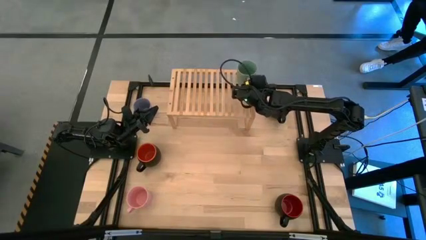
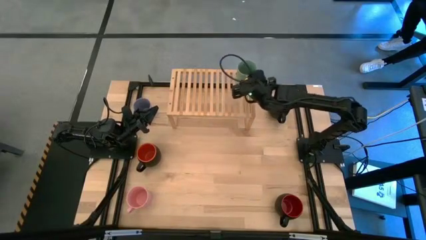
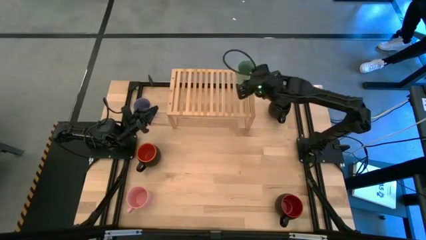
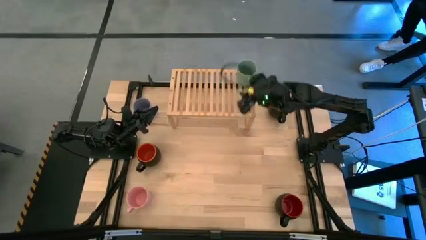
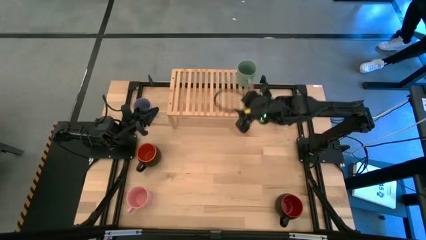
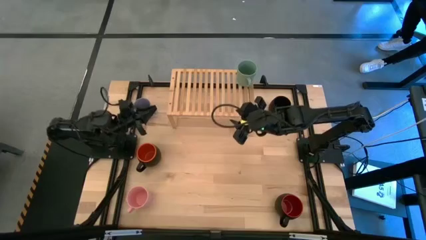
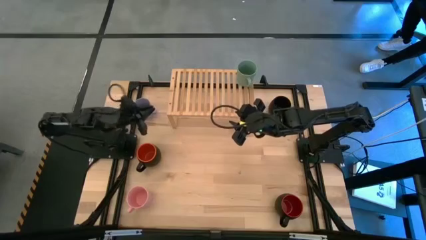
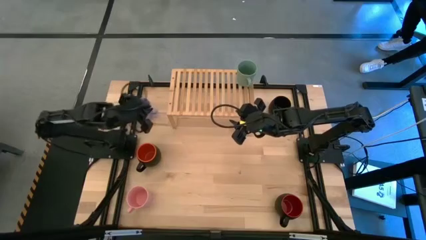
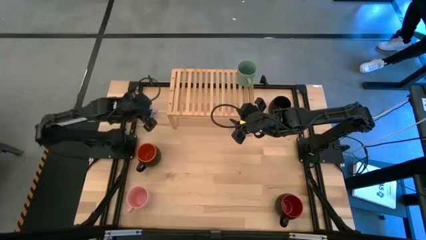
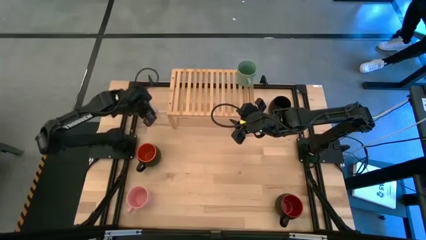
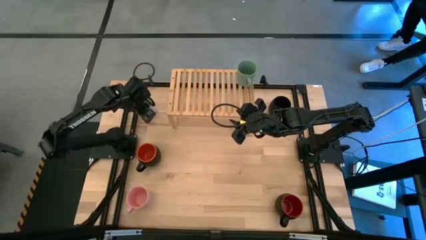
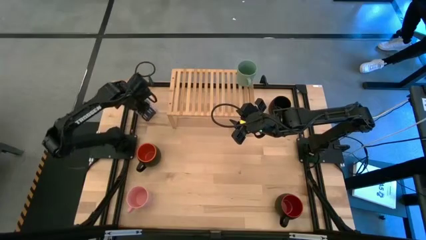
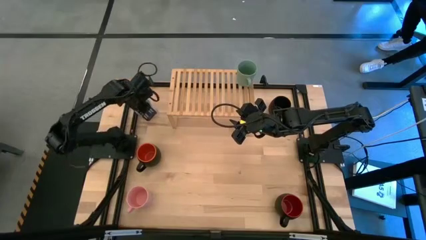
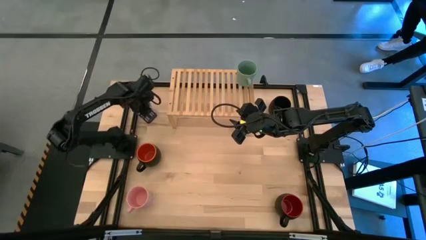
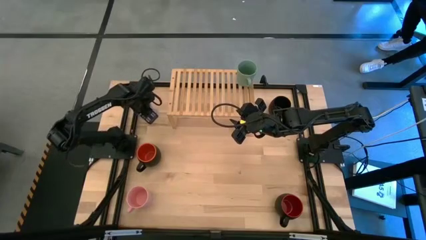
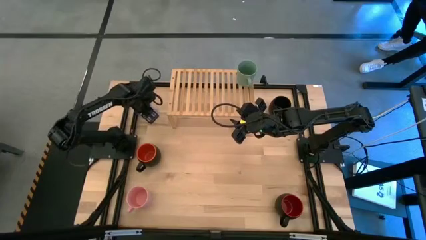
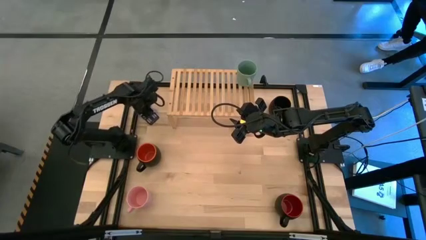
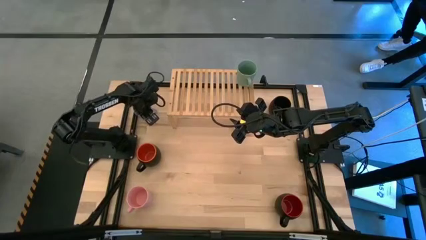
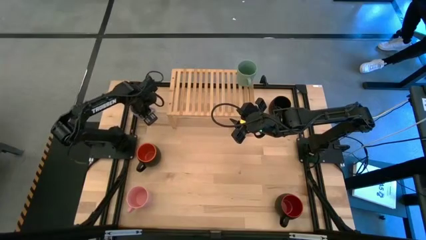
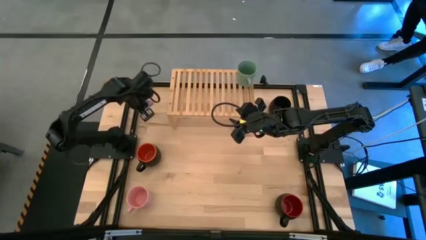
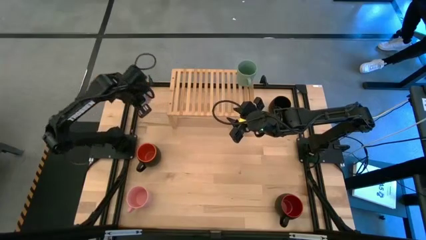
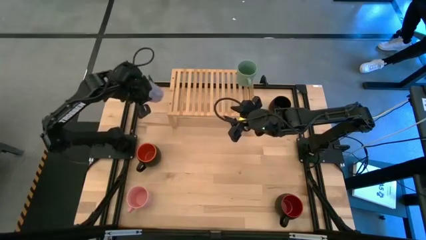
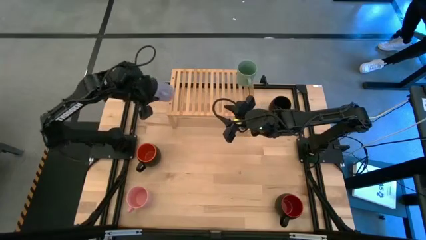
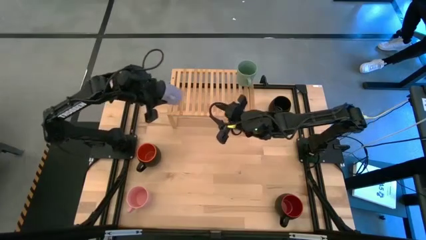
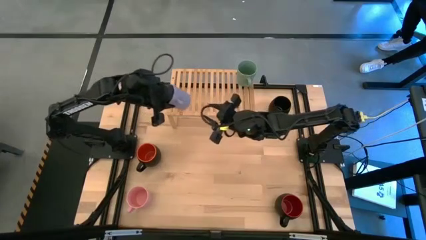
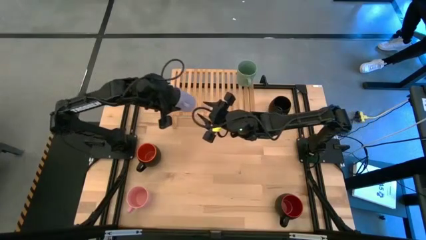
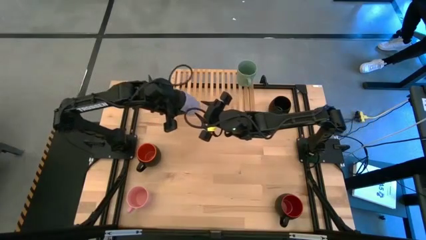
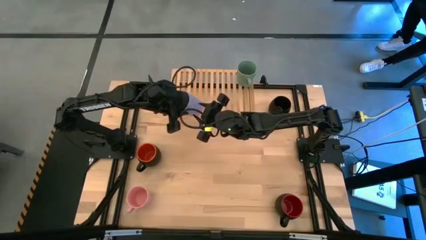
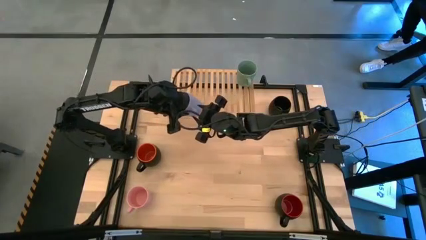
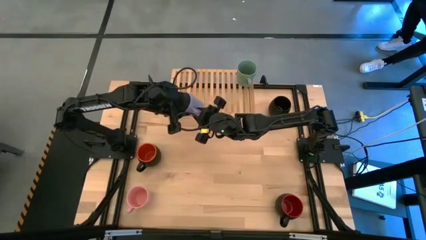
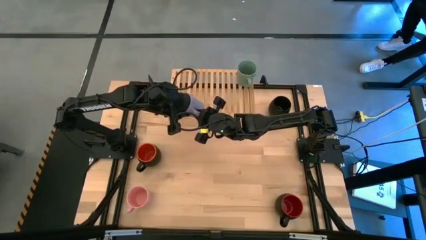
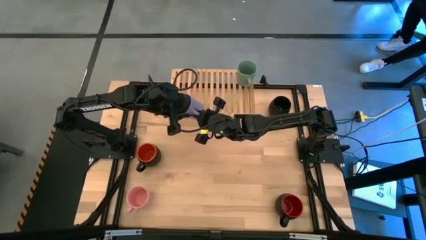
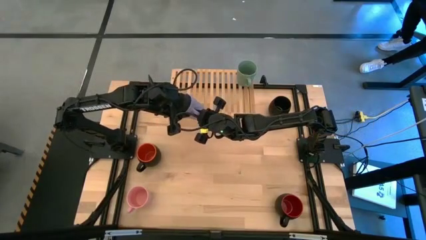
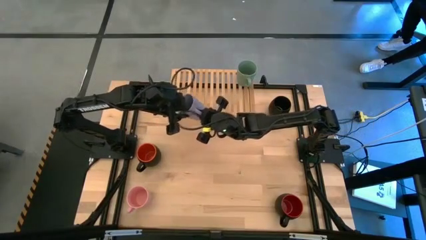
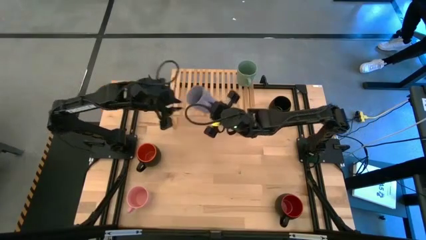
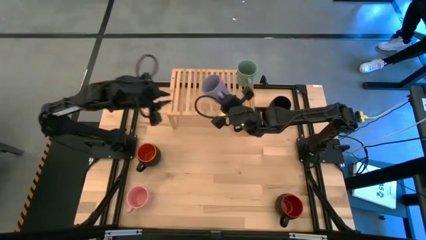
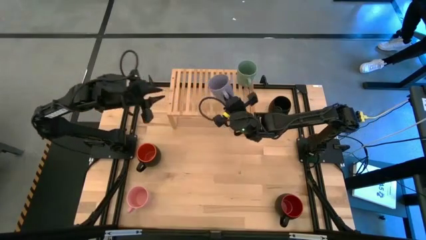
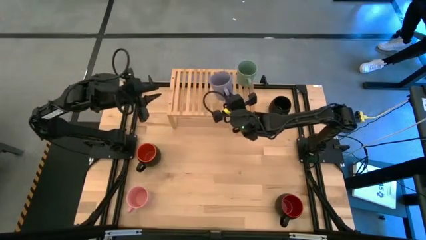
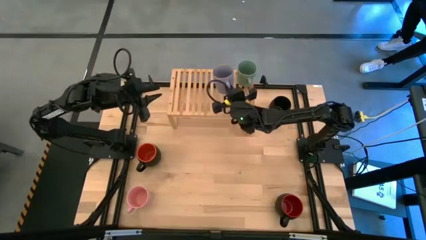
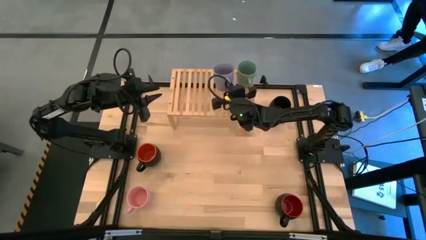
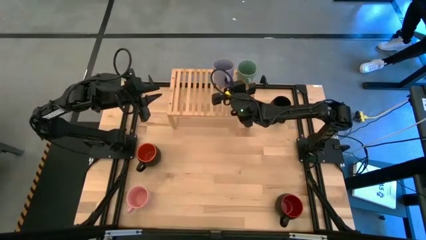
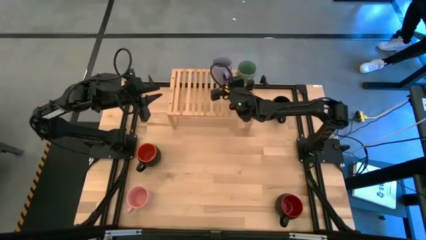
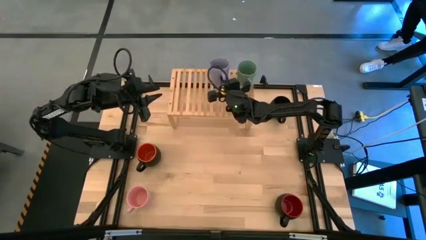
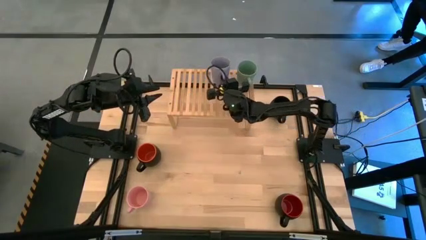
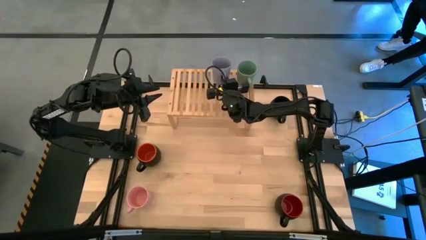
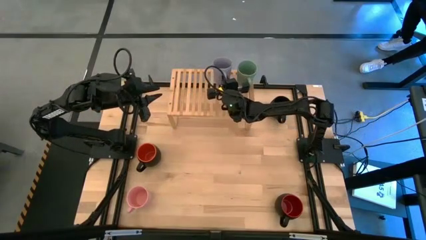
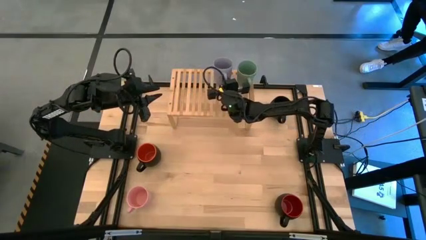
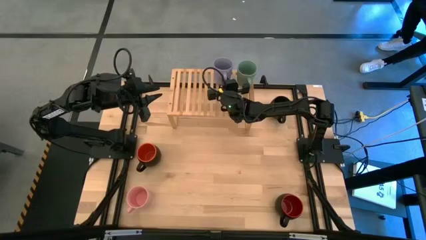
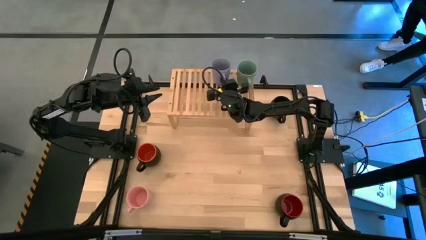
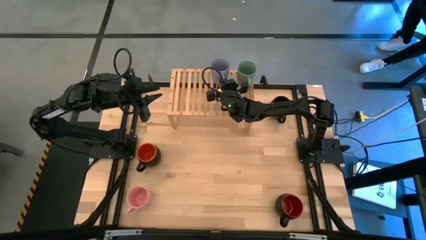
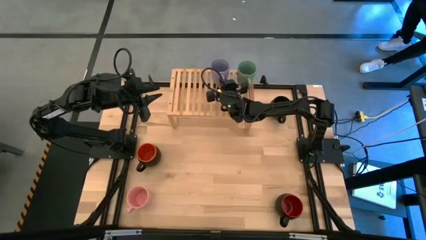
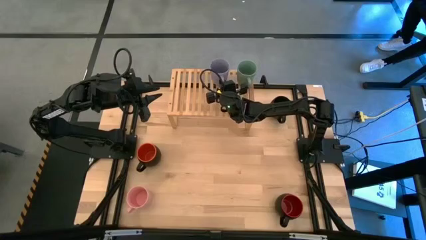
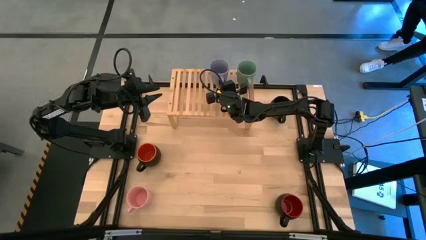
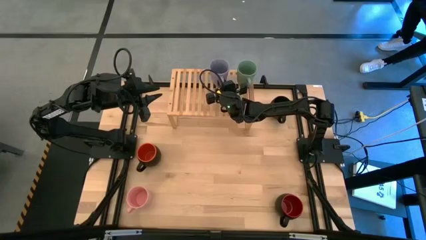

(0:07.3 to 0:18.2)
Task: Place coffee mugs
Put the purple mug on the shelf

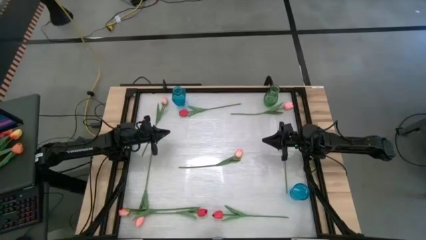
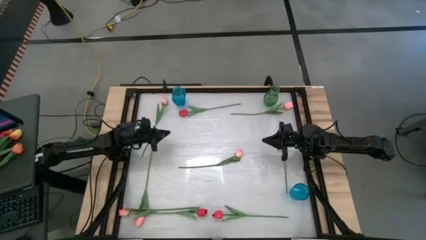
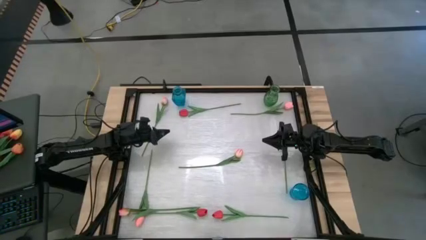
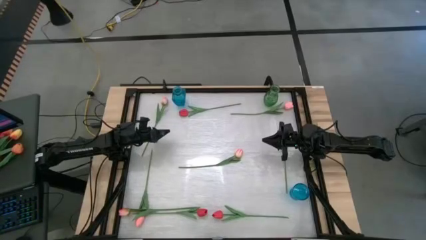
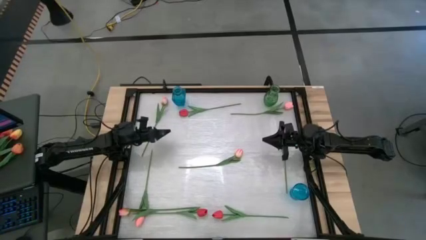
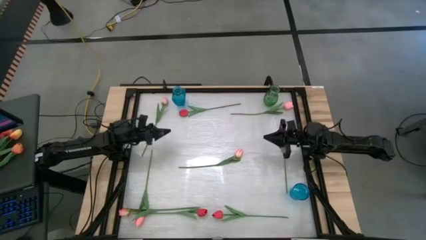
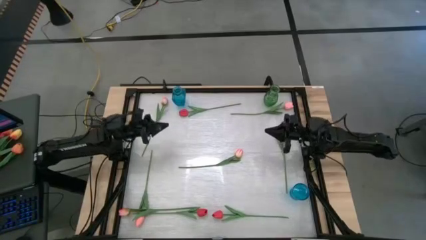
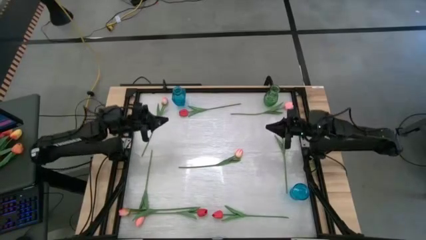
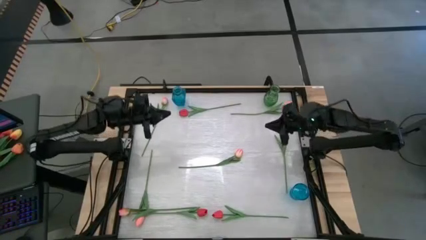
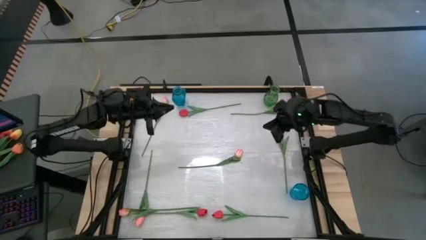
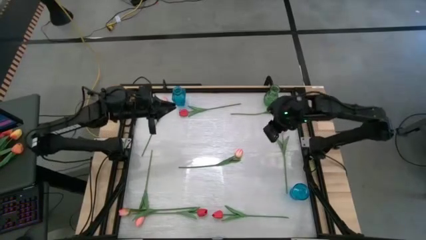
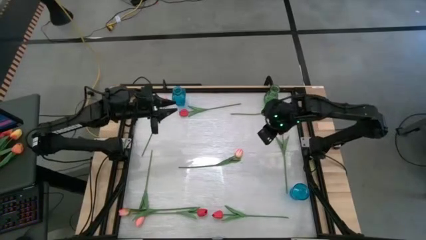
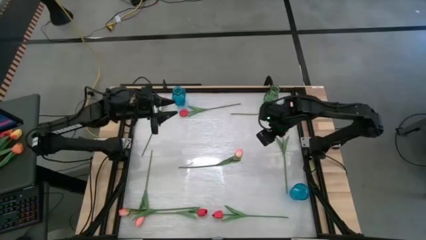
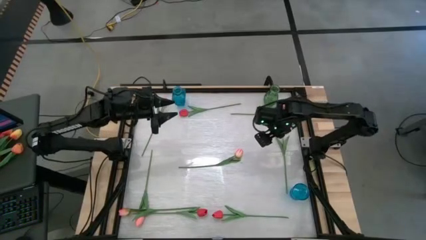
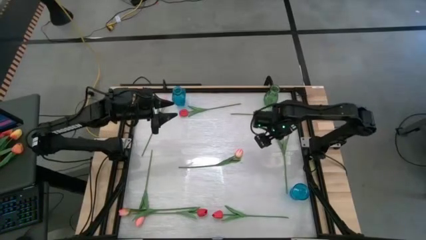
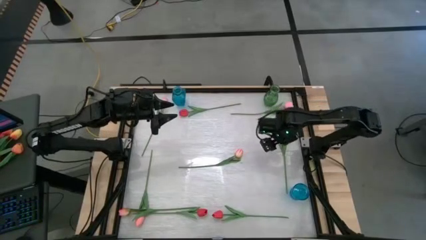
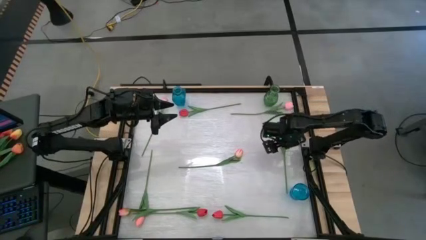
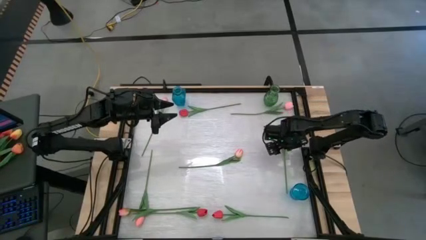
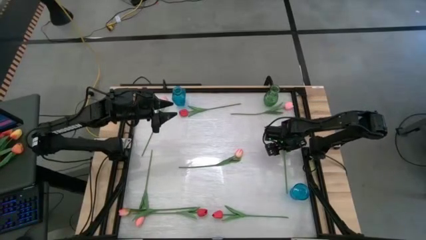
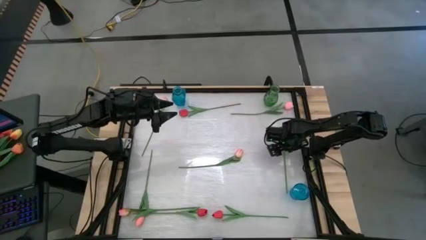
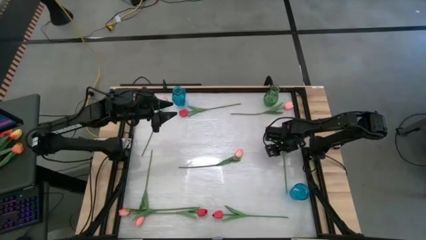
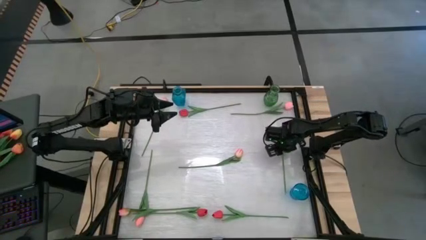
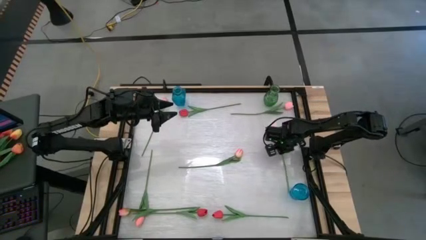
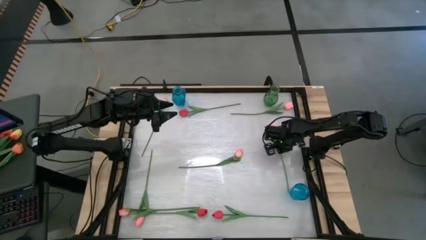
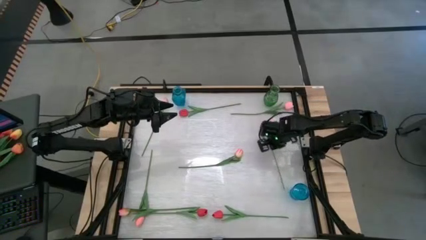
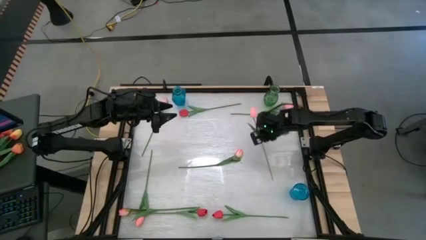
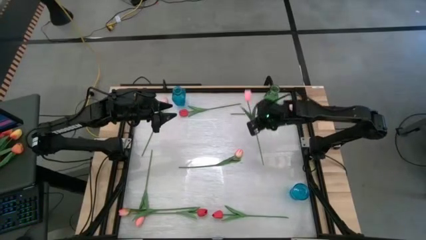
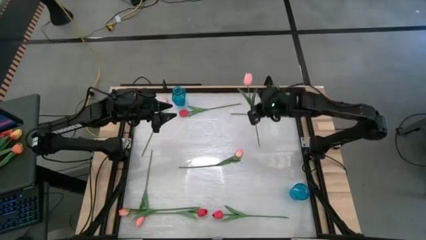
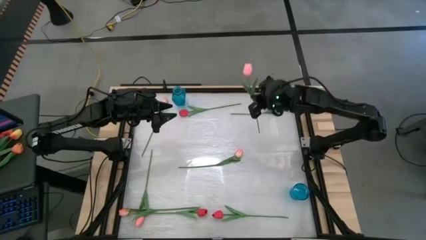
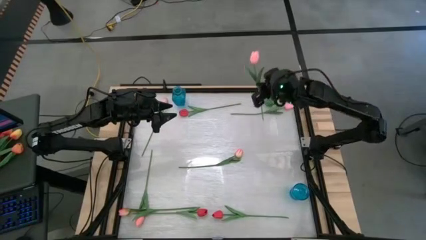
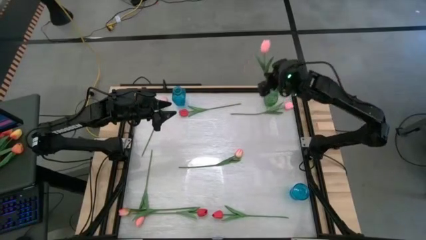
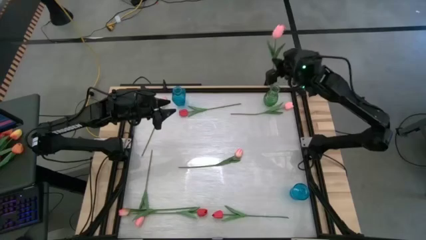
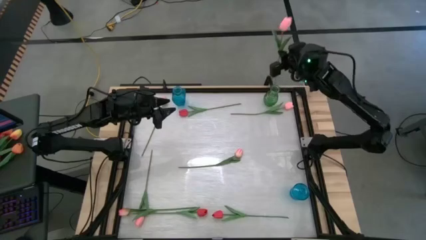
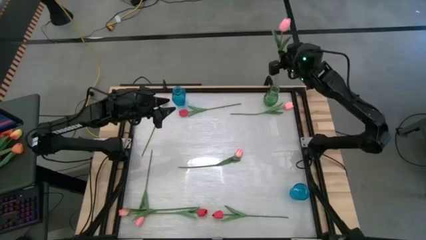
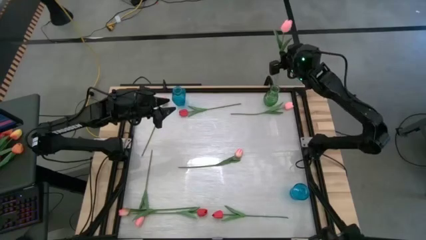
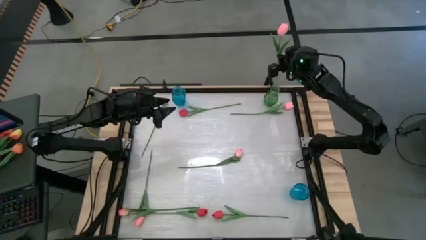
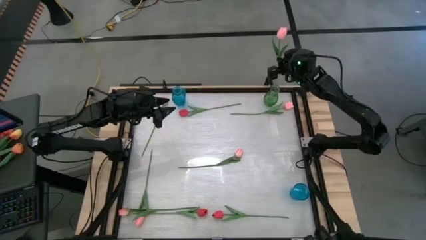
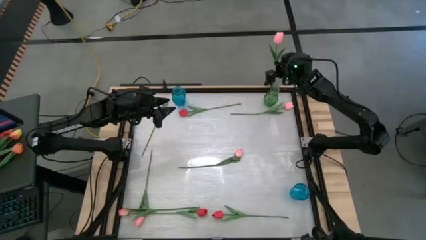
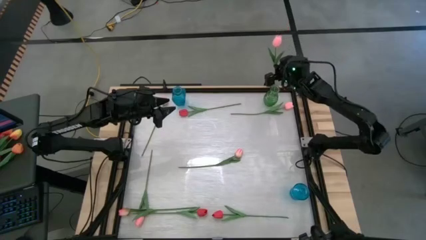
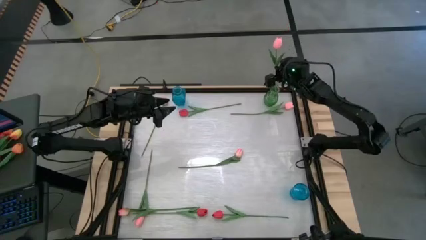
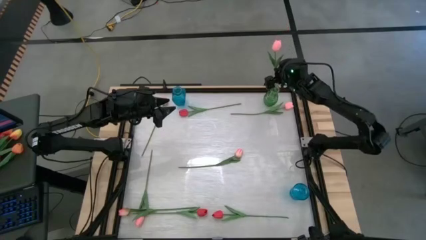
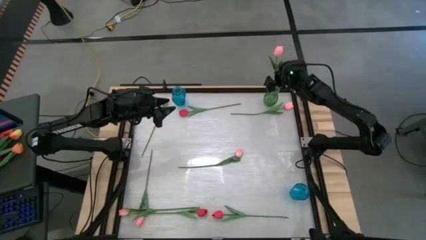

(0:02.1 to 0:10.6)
Task: Sort flowers into vase by color
Put the middle right pink flower into the green vase
